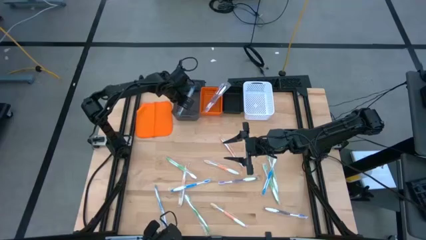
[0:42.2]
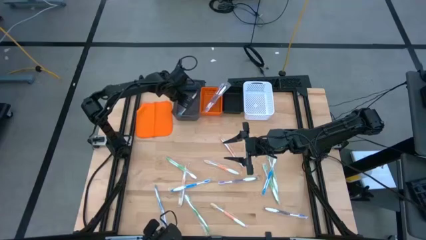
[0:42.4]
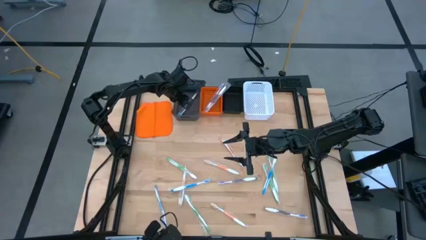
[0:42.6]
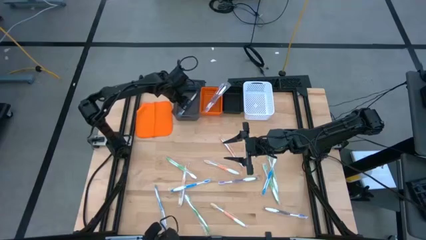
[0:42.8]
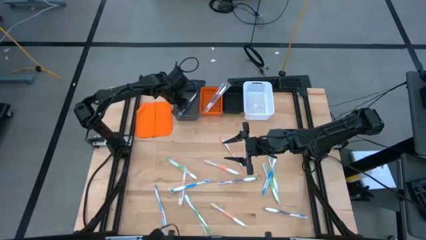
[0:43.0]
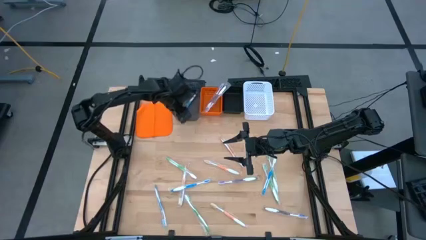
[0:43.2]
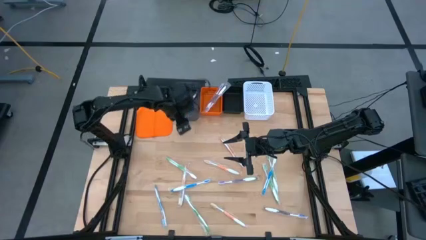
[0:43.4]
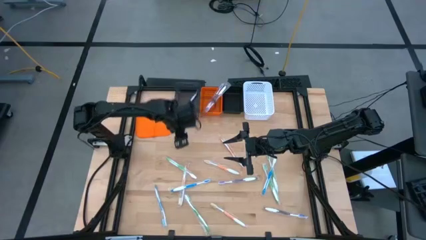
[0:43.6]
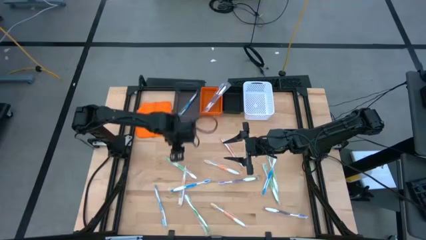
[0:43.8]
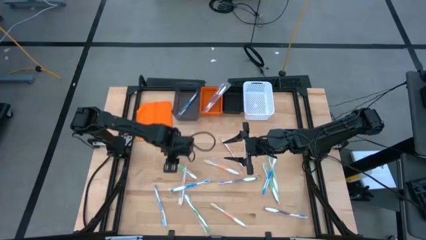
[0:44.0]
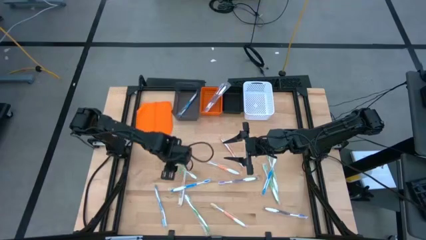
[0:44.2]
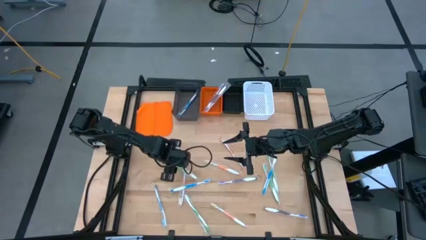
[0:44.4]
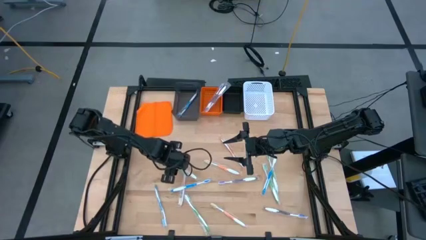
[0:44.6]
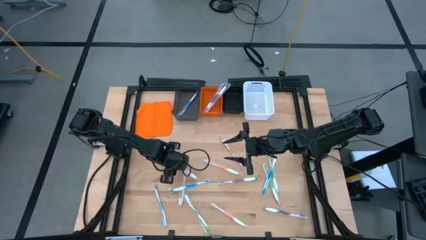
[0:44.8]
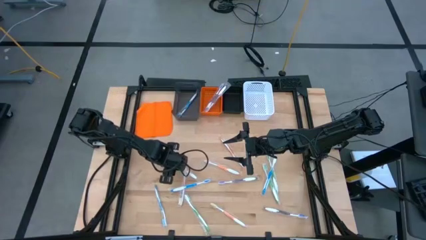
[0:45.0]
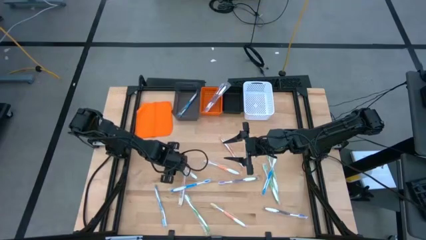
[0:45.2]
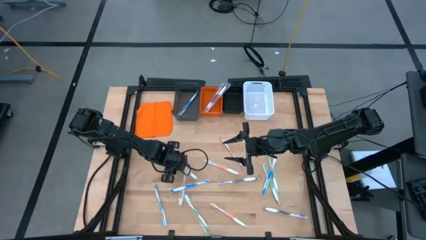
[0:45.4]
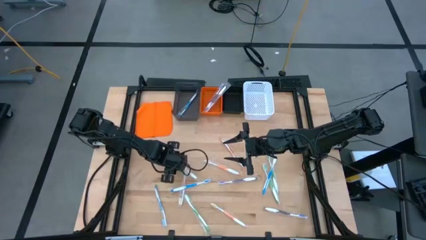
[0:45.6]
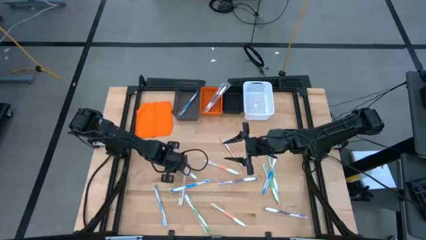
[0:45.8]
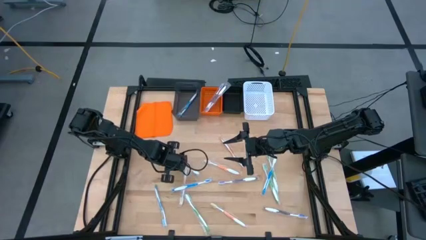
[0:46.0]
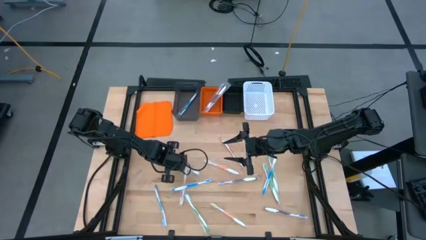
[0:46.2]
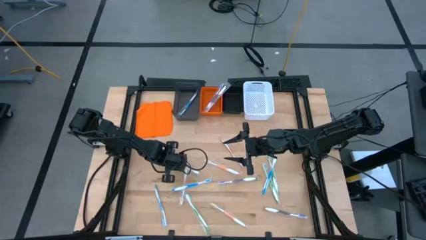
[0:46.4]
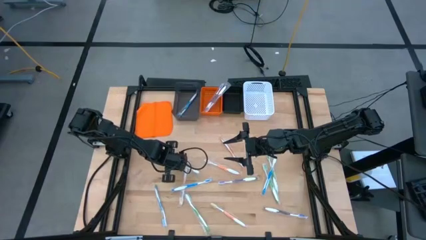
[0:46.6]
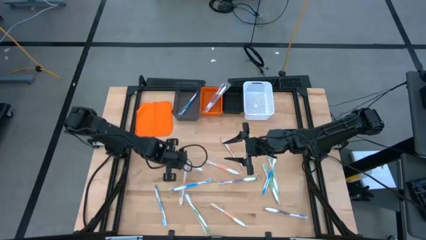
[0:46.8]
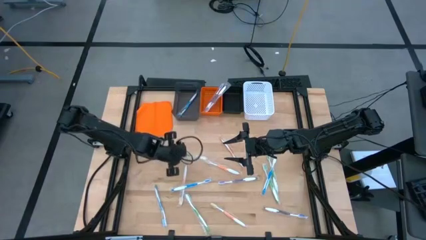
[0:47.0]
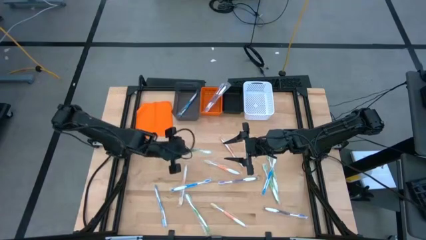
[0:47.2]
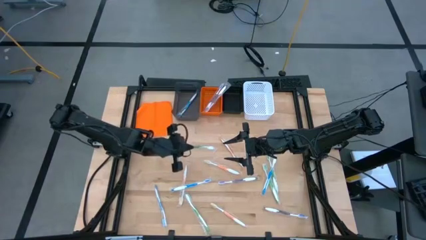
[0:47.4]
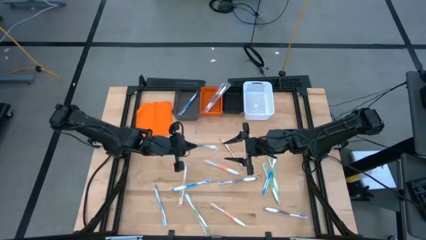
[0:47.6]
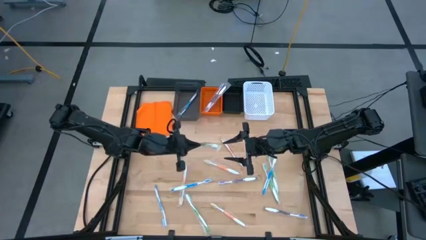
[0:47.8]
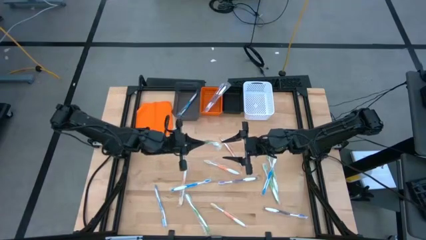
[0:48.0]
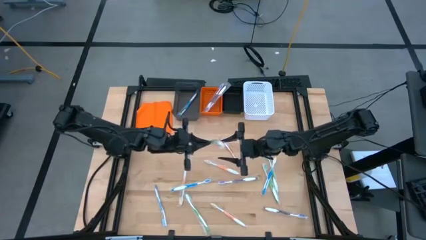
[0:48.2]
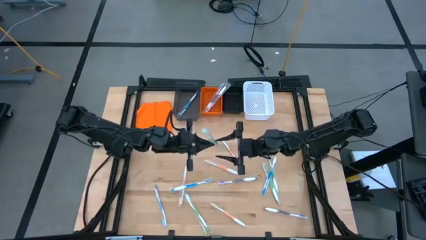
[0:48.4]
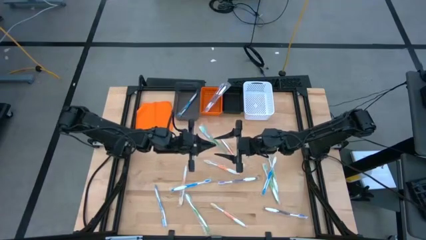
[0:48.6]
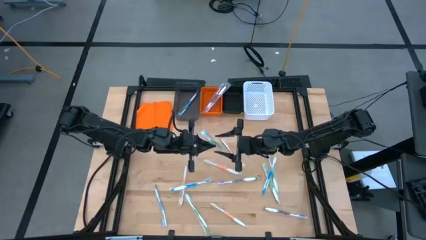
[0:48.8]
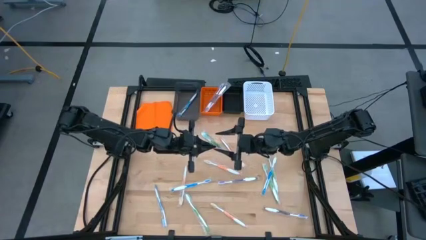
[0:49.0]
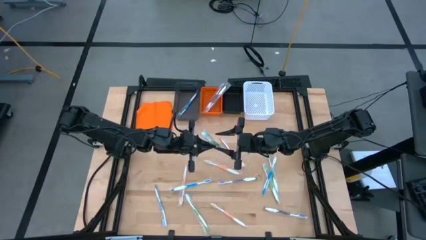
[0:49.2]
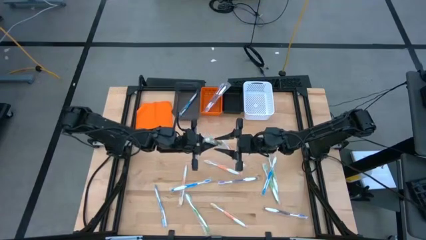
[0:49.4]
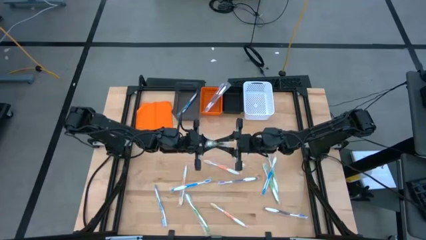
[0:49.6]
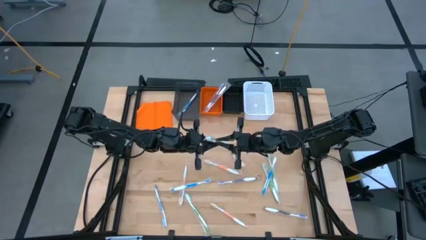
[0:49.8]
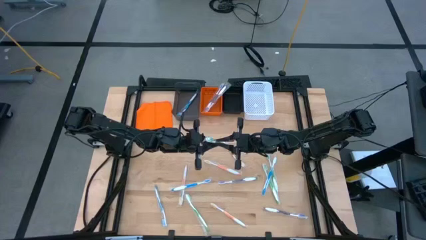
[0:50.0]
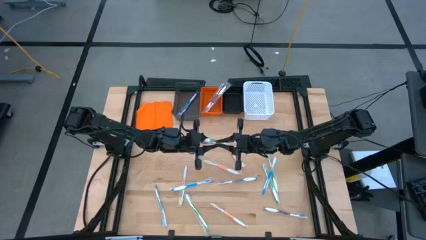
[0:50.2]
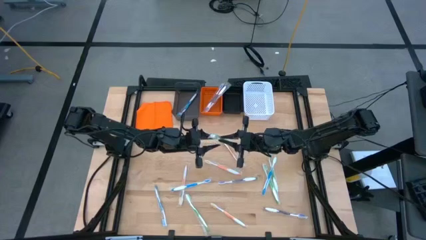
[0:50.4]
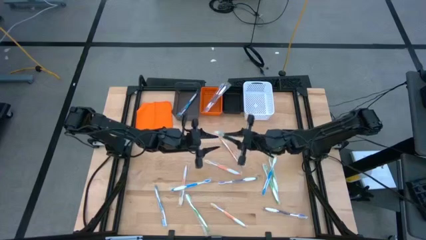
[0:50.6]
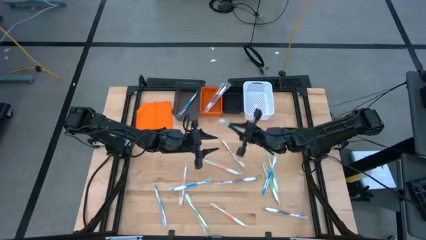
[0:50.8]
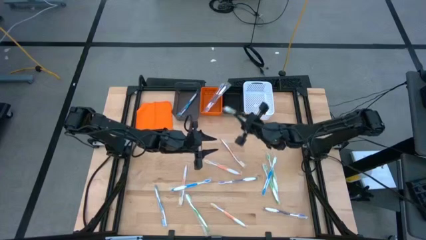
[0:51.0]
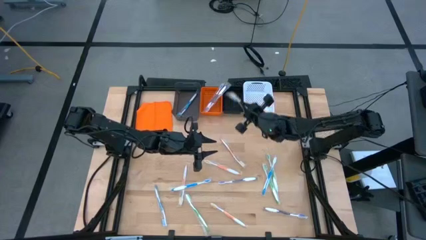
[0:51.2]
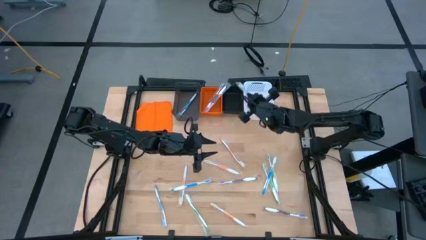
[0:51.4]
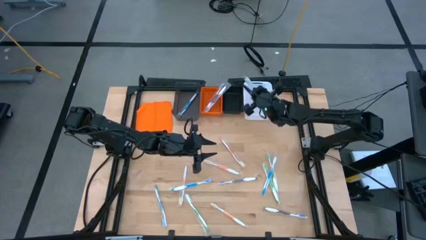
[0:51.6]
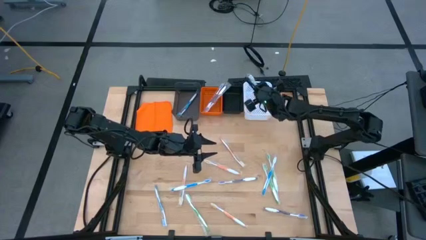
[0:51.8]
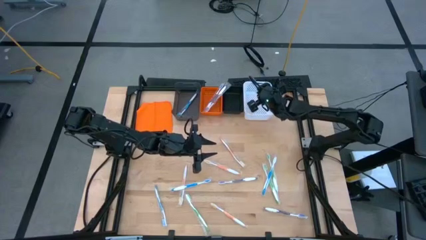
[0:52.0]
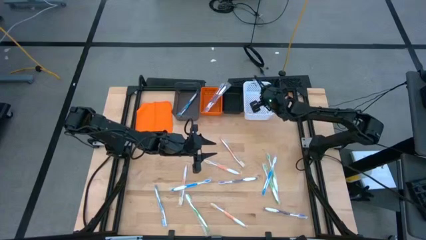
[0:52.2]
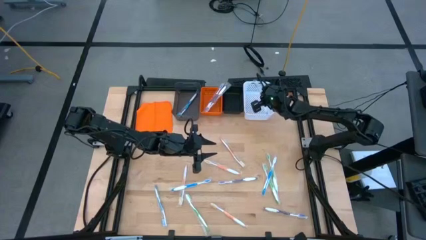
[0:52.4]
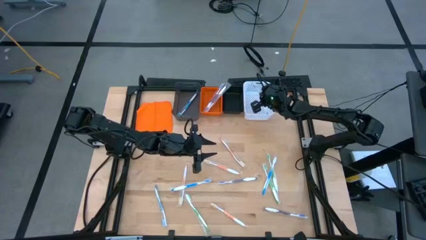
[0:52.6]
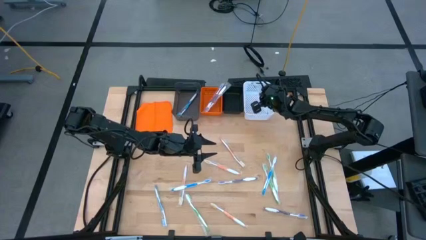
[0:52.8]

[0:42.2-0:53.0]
Task: Pick & Place Toothbrushes
Put the green toothbrush into the white bin

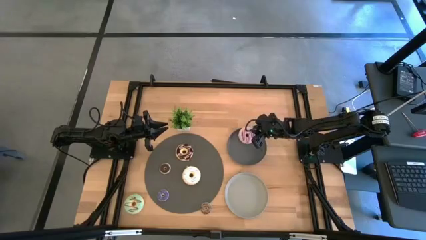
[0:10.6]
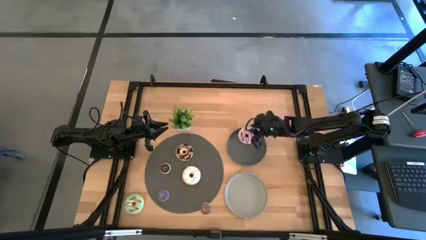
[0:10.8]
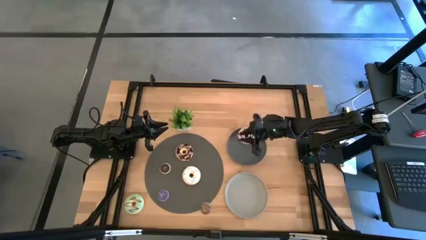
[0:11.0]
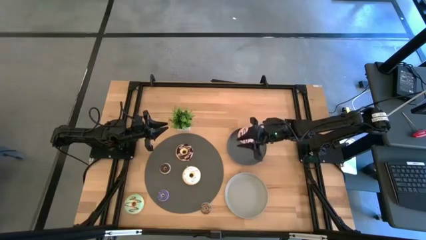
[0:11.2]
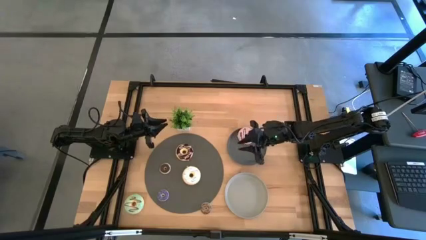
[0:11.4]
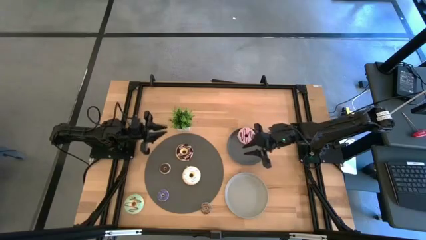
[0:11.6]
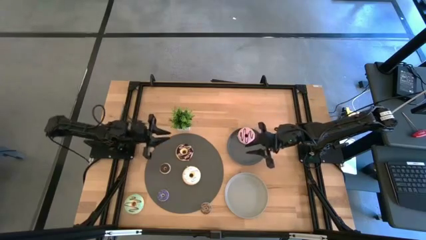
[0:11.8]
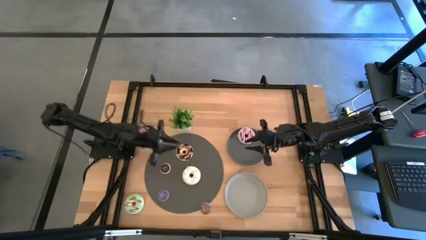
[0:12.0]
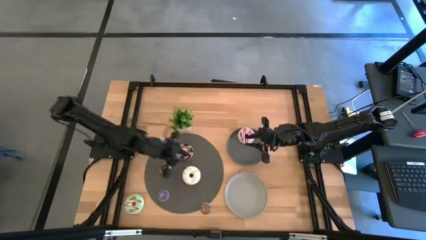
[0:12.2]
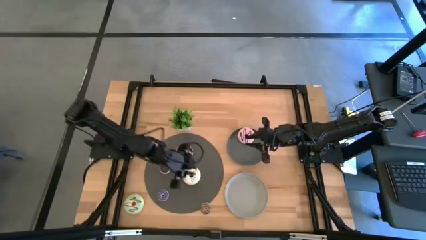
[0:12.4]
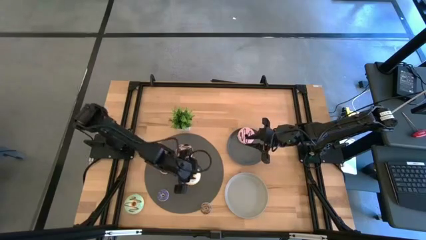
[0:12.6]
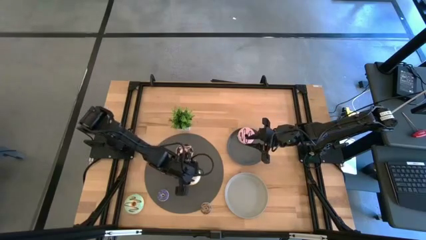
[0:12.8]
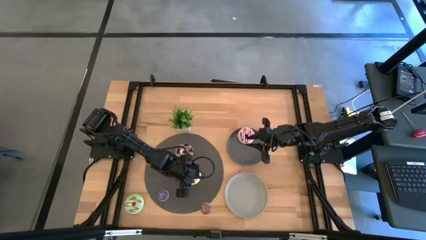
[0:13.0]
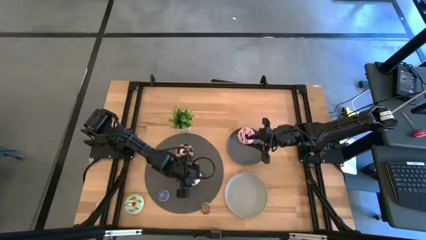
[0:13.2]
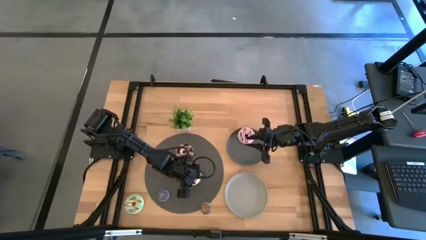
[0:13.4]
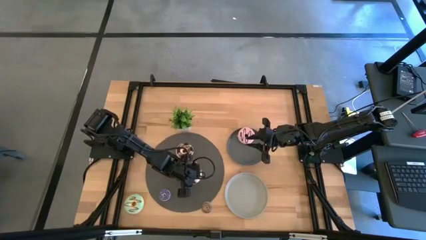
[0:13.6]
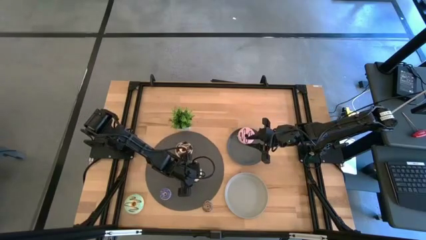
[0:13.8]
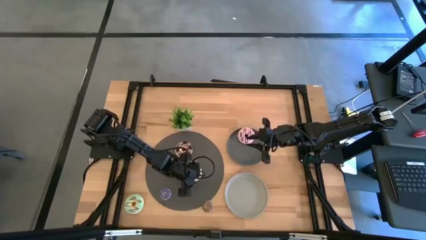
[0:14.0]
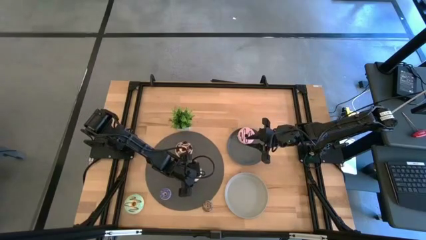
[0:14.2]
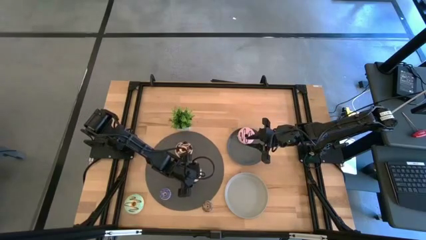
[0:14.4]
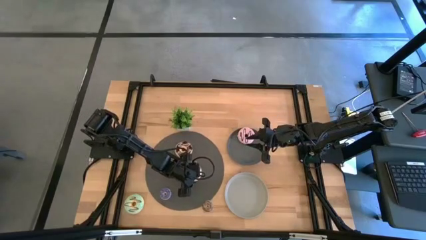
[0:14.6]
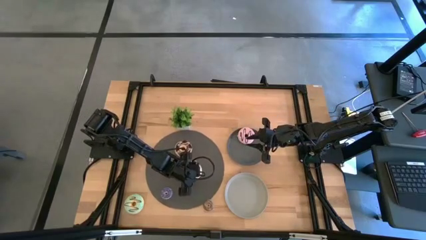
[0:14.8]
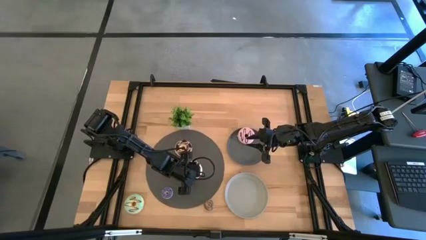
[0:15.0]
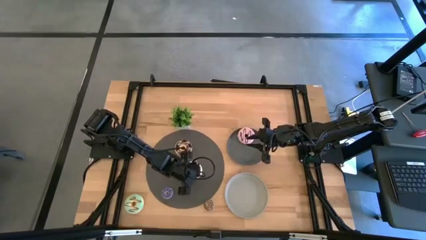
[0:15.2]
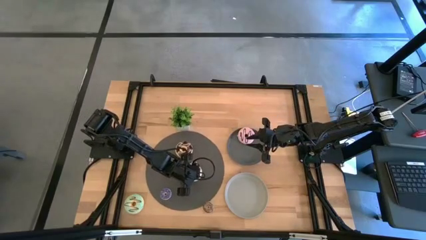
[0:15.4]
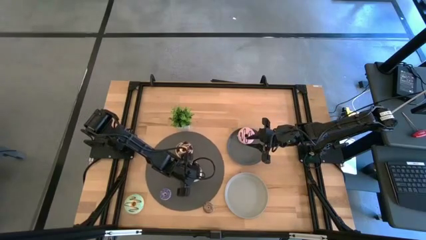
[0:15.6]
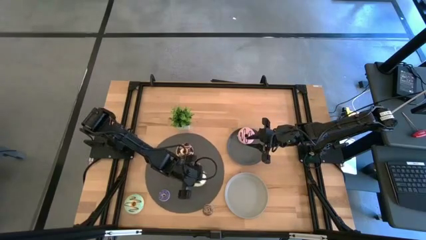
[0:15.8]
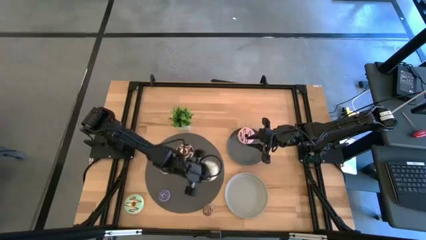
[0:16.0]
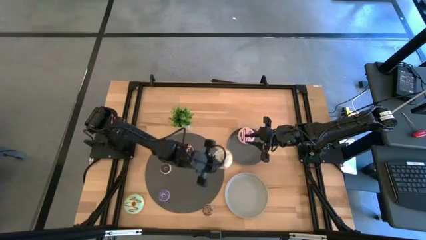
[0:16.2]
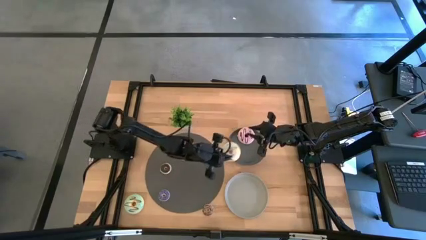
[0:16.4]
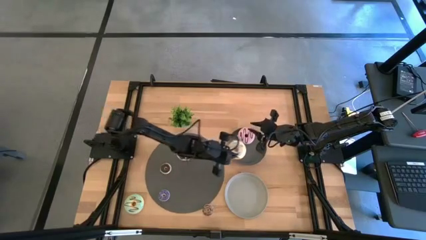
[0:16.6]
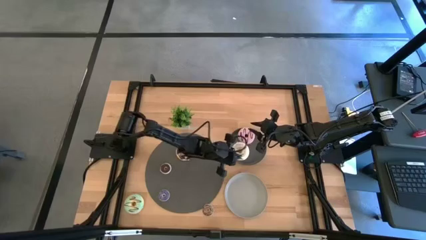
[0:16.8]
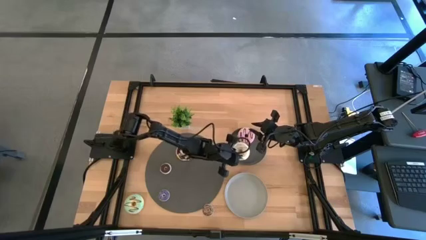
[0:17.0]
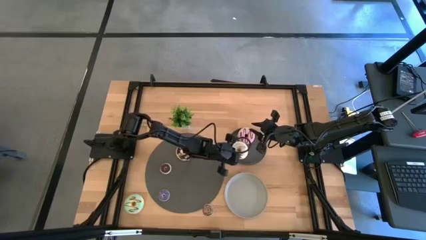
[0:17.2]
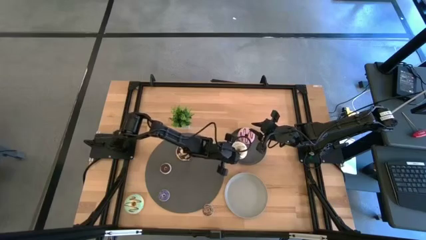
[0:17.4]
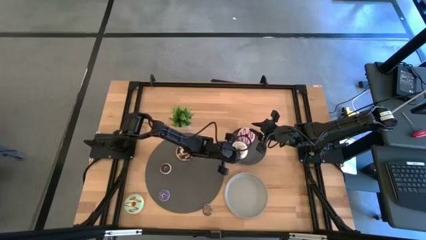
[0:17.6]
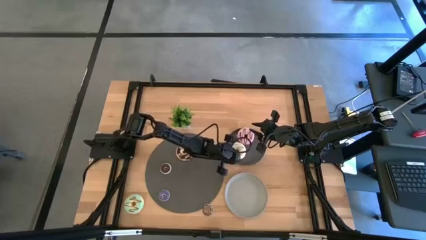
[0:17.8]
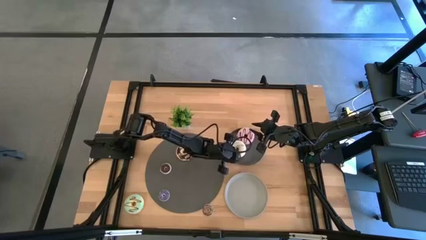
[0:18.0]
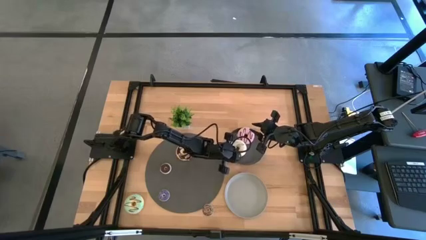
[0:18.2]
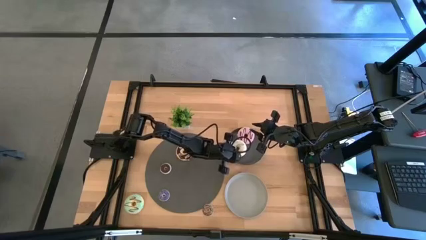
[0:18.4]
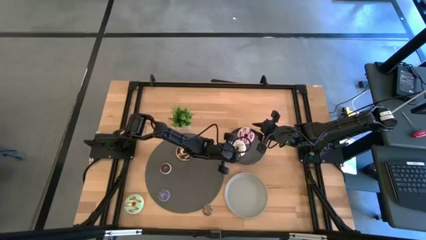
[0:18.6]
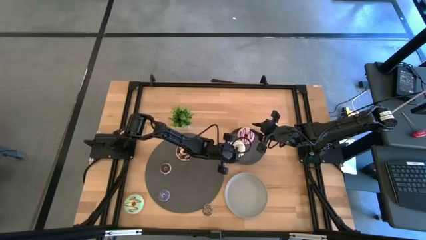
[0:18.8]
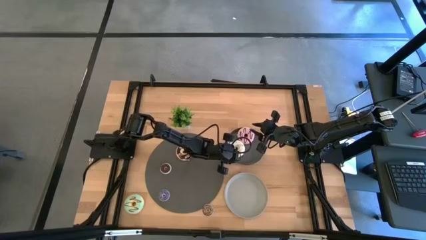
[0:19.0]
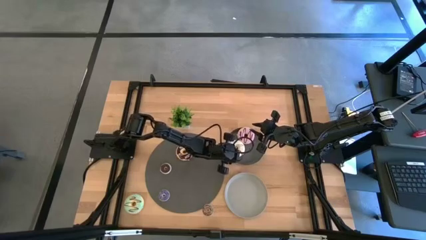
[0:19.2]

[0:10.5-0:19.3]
Task: Pick & Place donuts
Put the large white donut on the black plate
